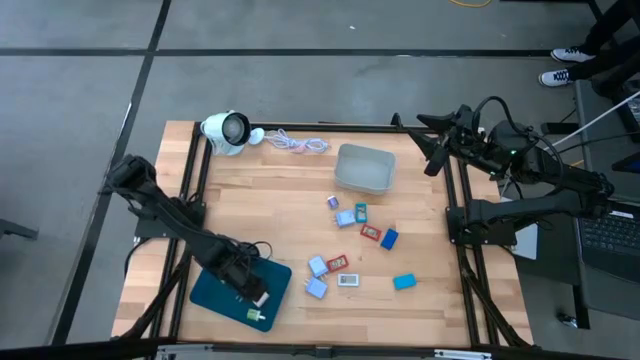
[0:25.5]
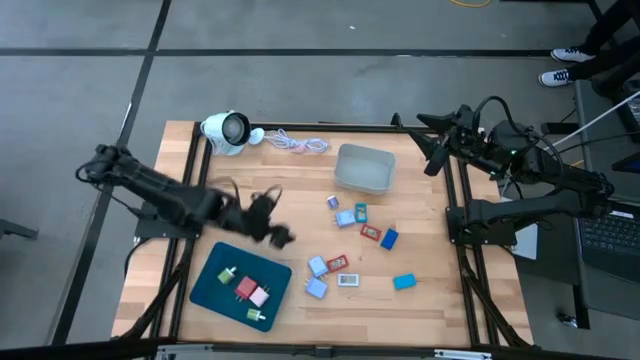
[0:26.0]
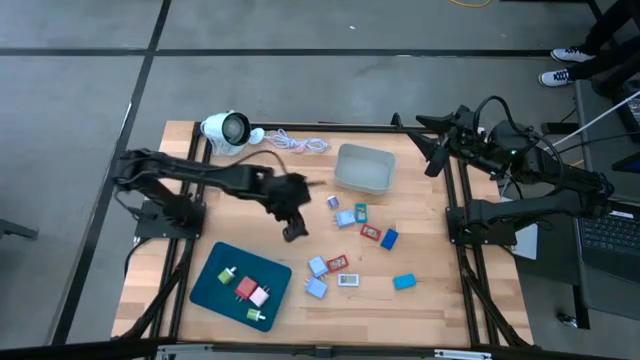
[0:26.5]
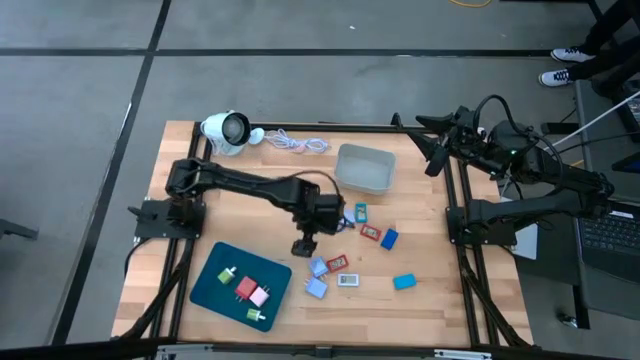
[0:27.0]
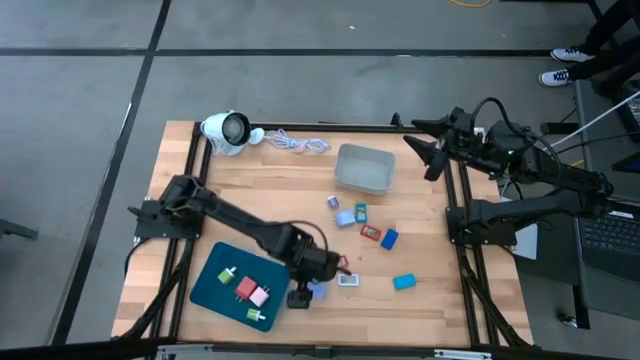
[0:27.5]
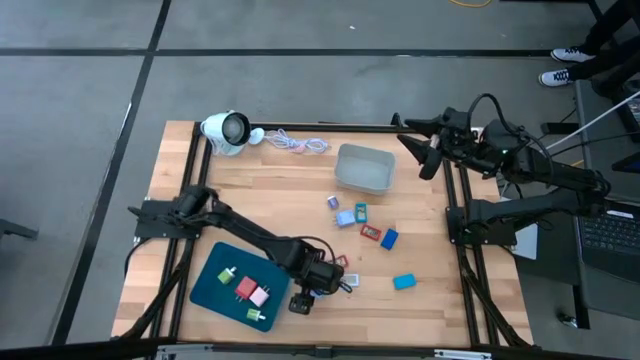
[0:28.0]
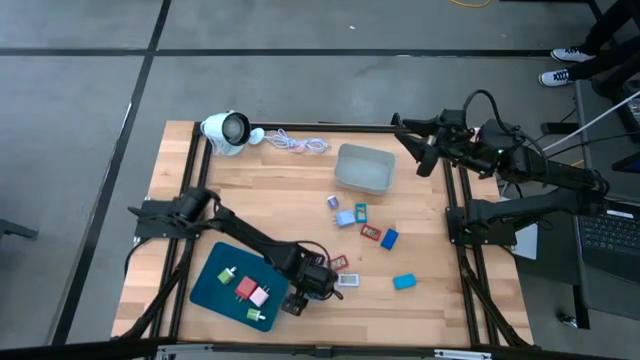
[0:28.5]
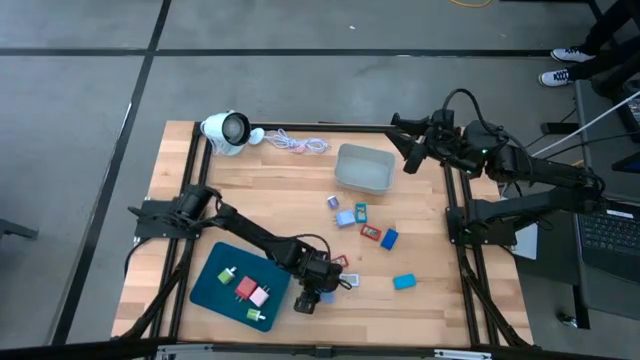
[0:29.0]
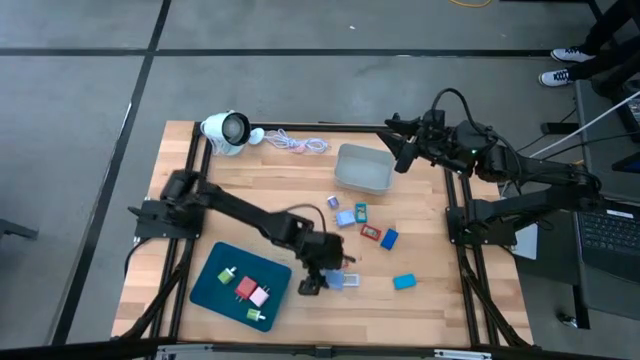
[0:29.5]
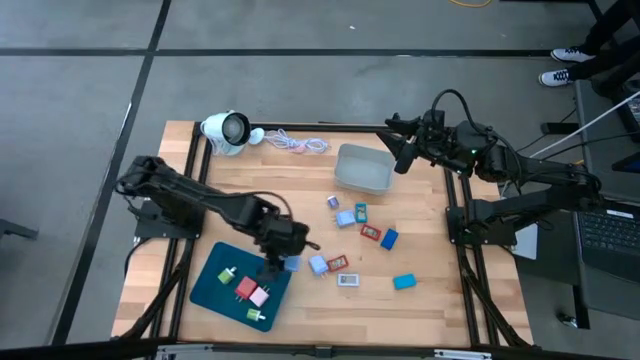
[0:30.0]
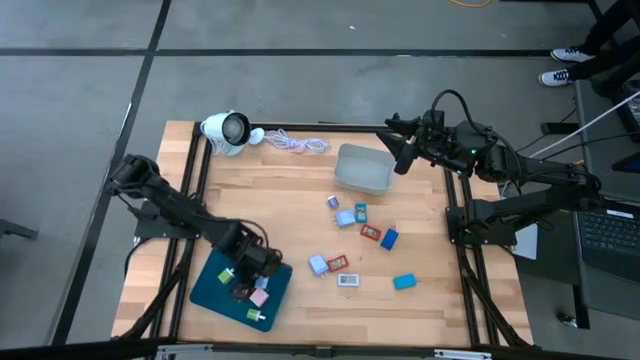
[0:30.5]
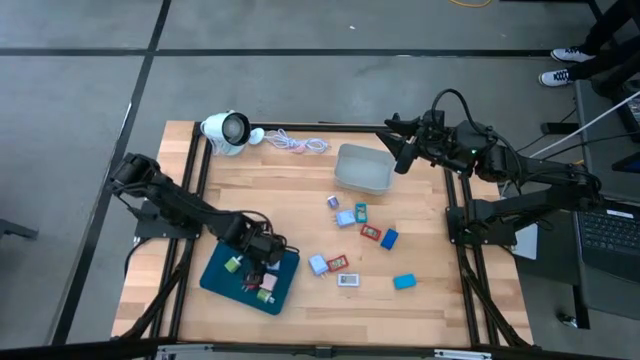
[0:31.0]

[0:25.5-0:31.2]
Task: Pick & Place Office items
Put the bottom blue charger adapter into the blue bin

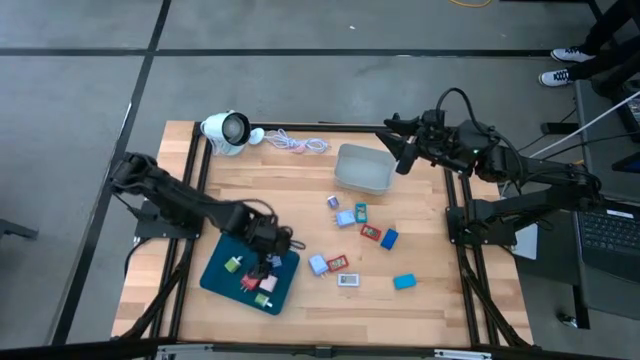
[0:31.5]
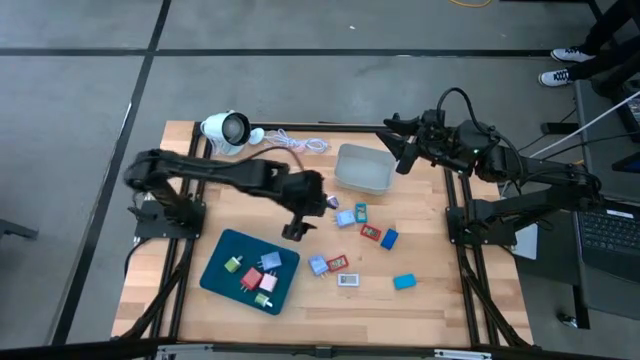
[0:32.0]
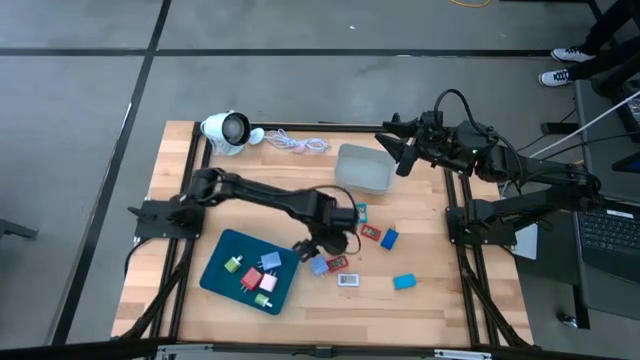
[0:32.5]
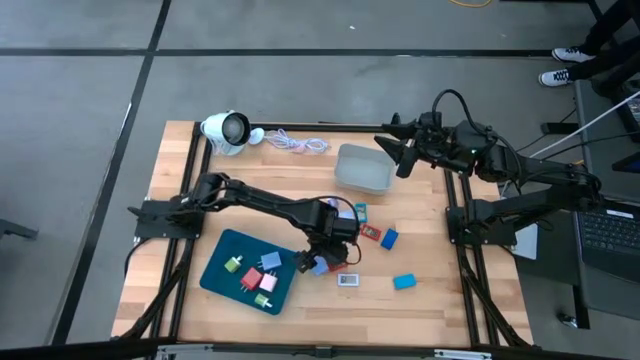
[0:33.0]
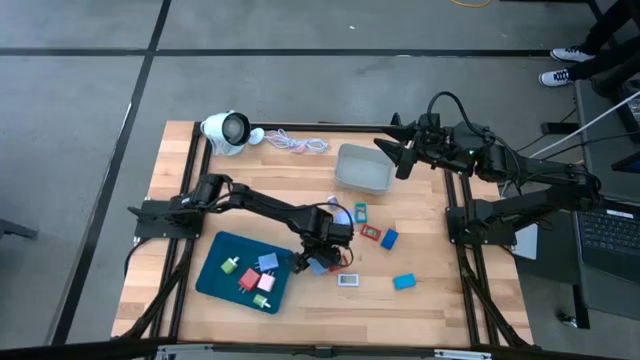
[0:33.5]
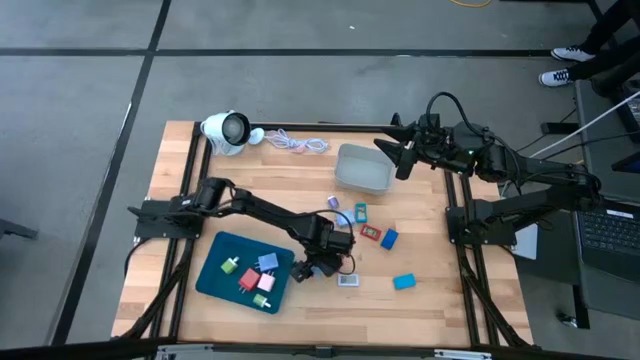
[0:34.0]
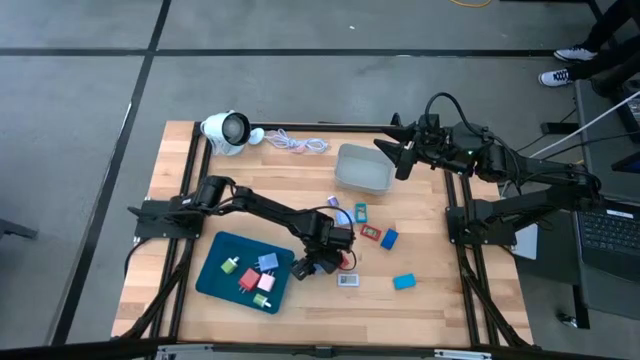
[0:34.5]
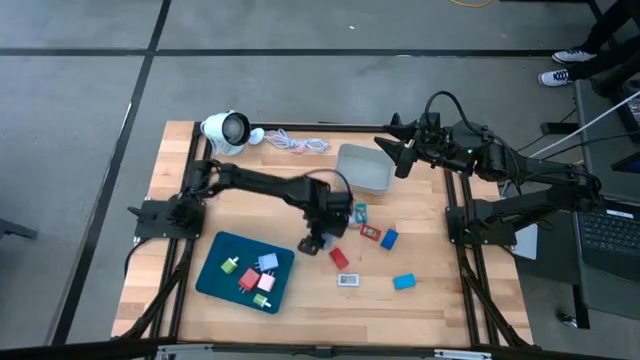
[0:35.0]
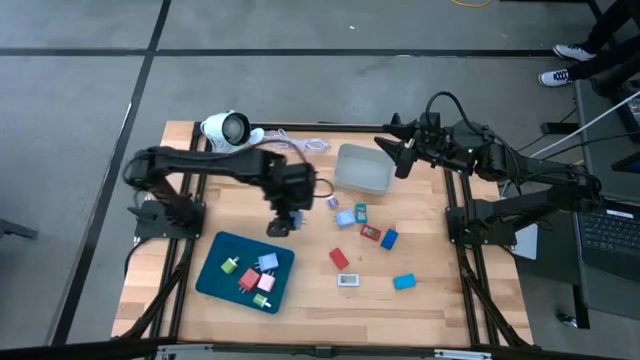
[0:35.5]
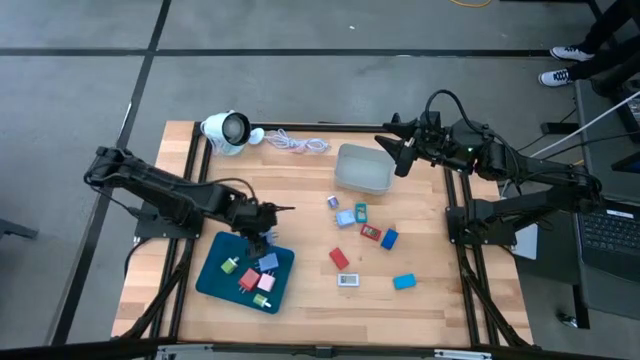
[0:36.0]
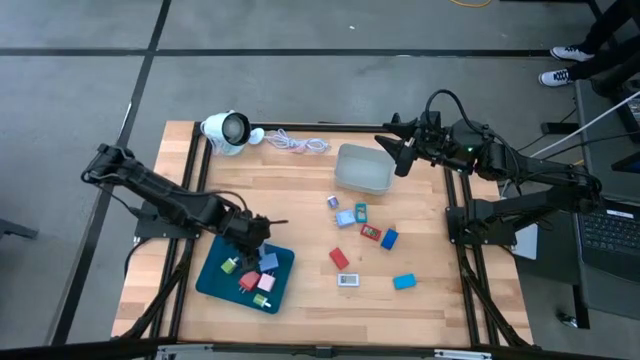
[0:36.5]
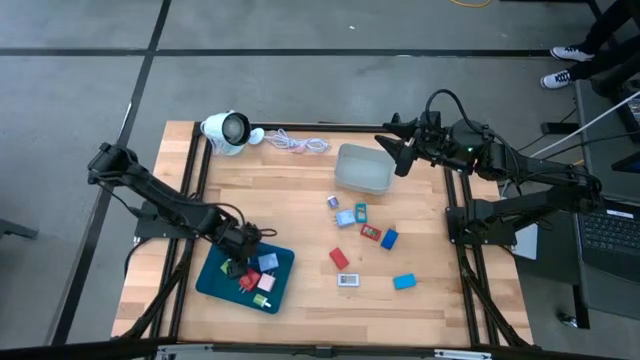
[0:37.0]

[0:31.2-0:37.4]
Put the bottom blue charger adapter into the blue bin

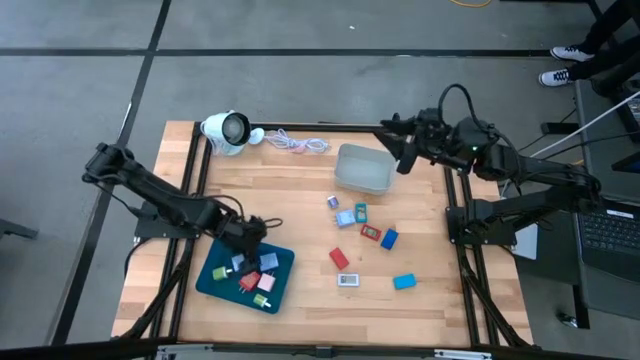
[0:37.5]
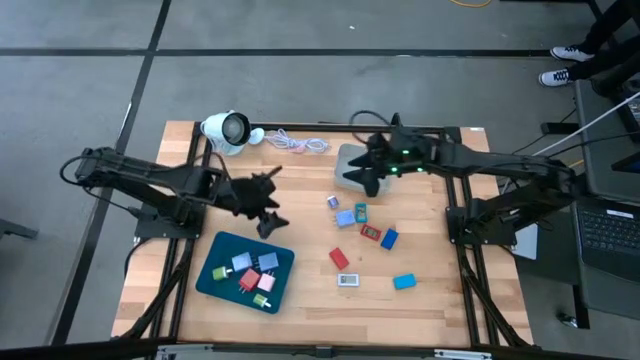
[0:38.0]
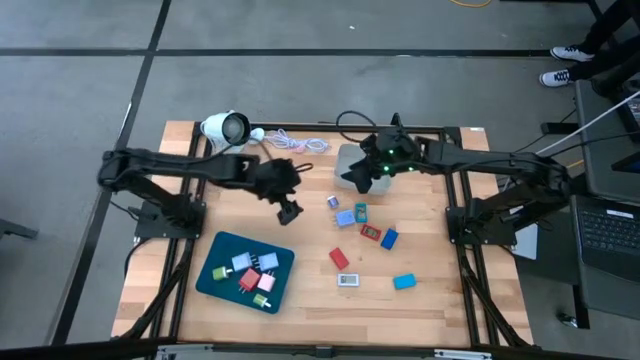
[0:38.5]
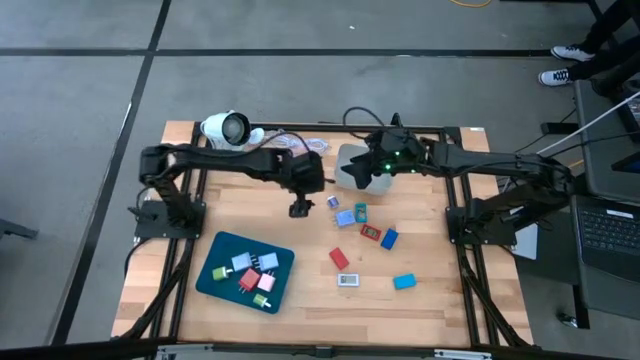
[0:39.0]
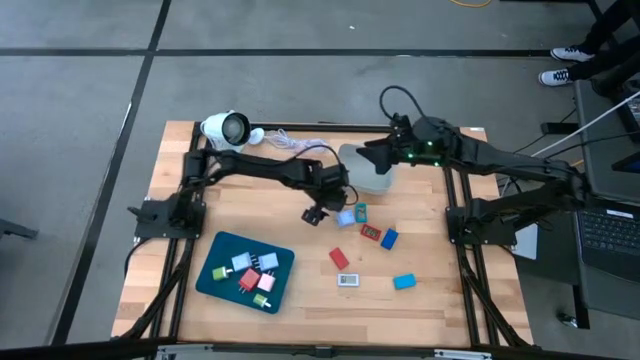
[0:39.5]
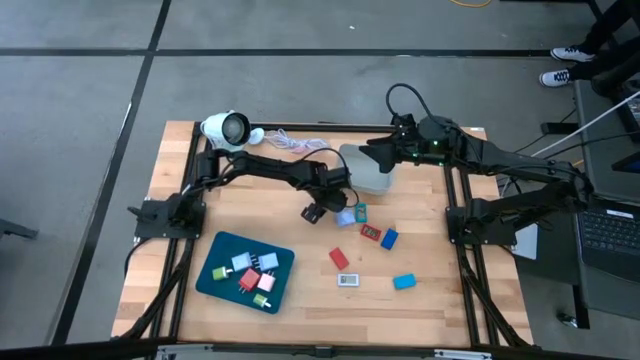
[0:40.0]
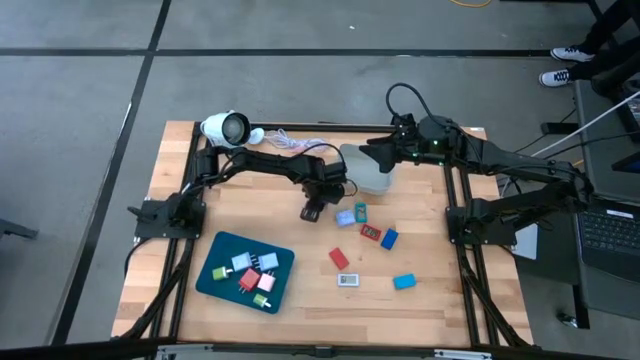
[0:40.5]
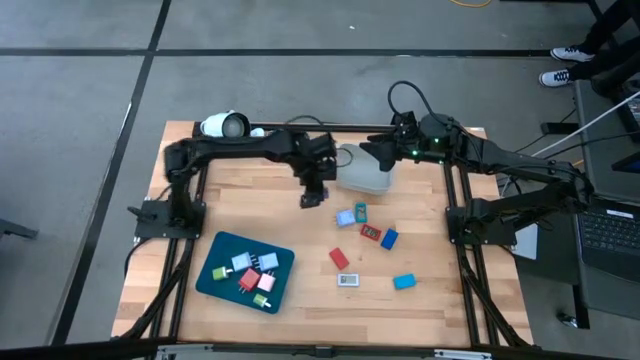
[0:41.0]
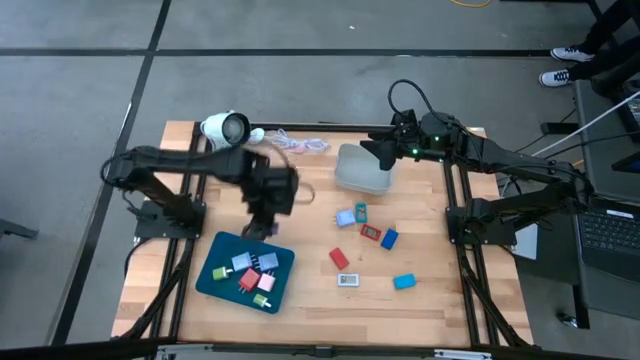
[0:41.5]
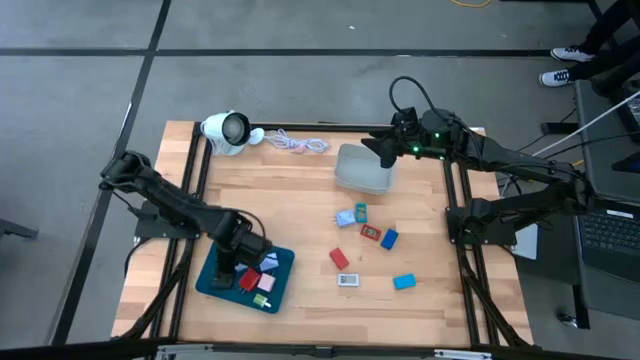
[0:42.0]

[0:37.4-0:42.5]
Put the dark blue charger adapter into the blue bin

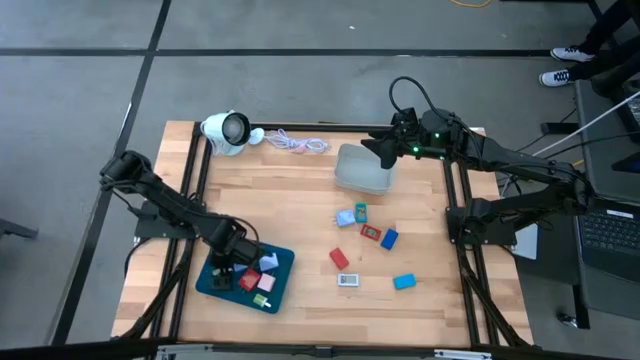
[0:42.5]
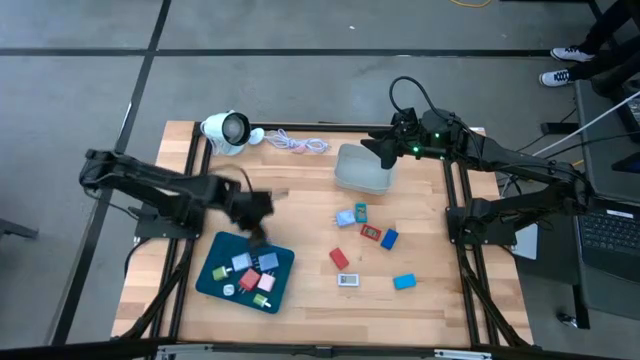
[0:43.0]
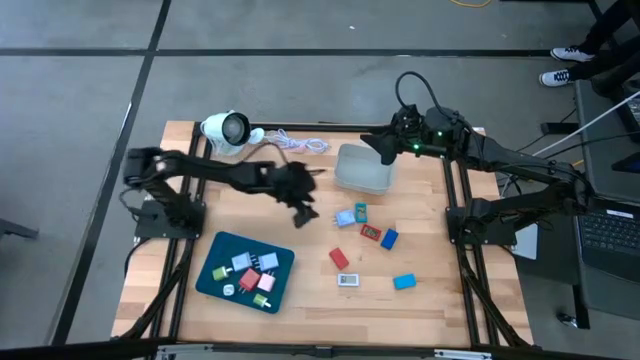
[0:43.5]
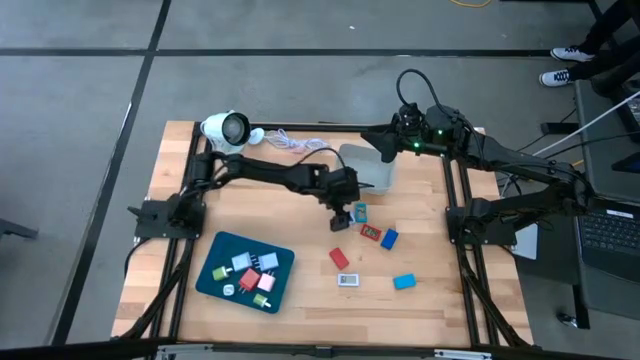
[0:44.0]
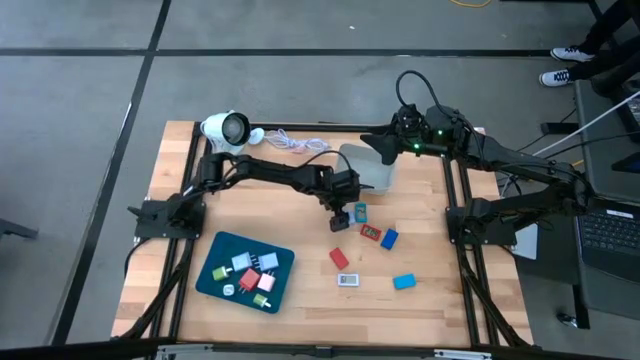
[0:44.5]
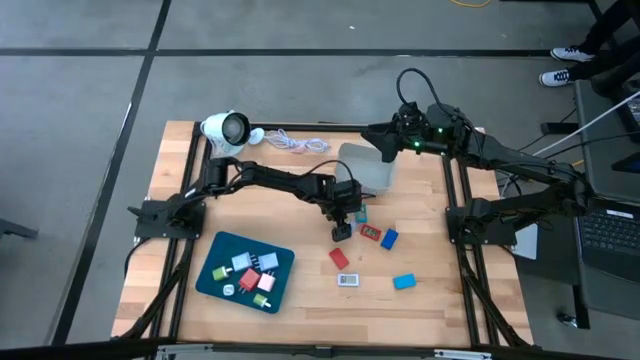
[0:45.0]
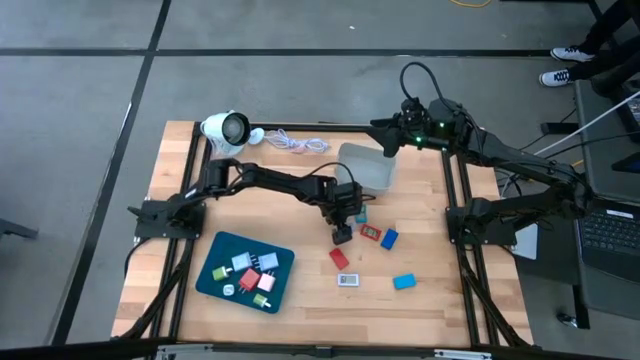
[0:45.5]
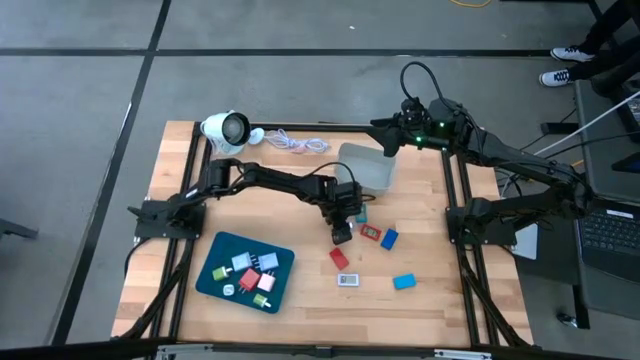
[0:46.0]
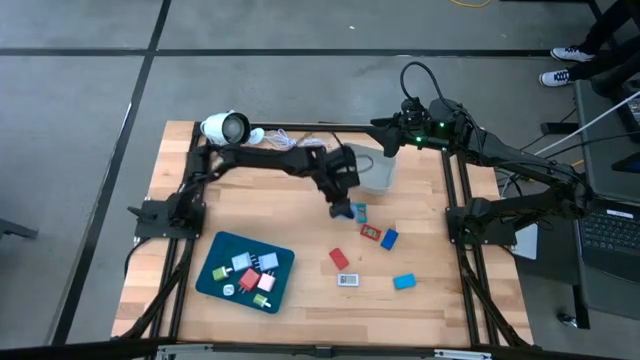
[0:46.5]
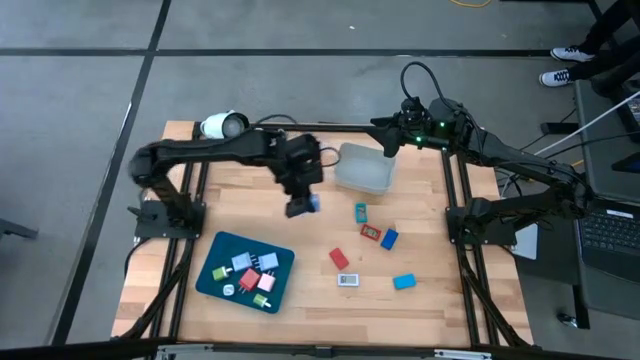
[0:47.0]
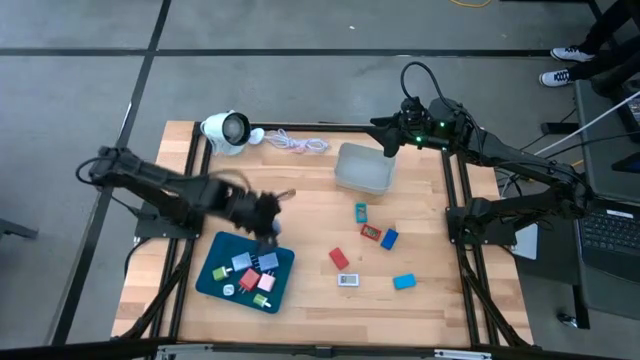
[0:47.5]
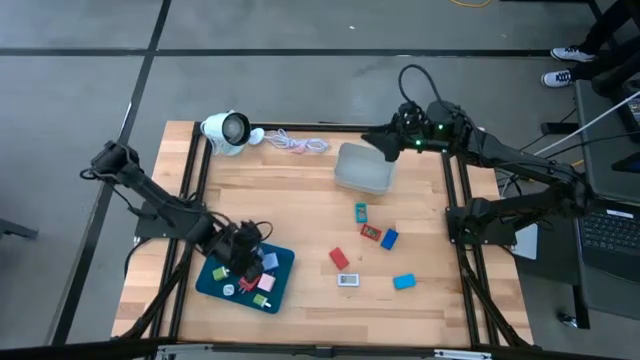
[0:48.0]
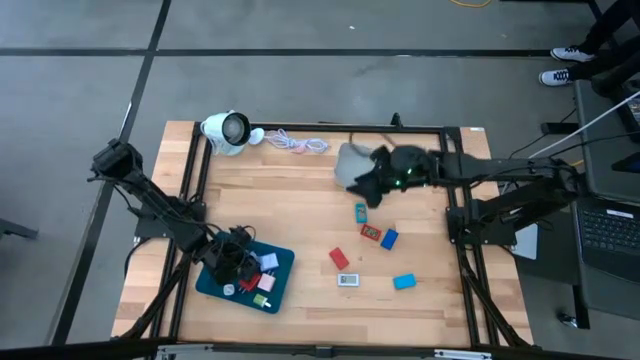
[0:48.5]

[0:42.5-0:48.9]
Put the blue charger adapter into the blue bin
